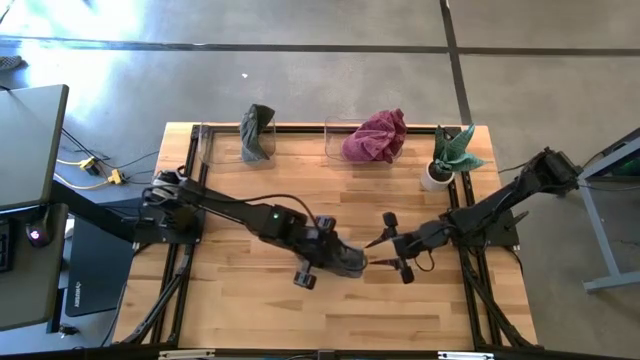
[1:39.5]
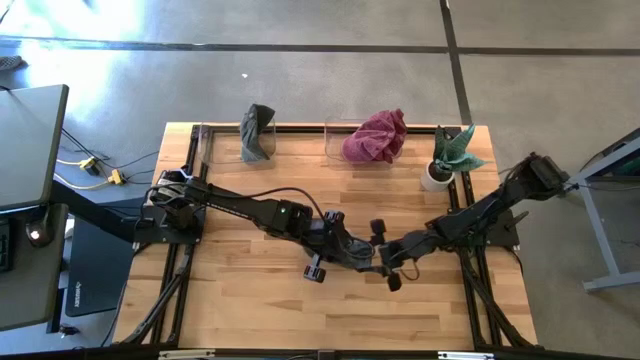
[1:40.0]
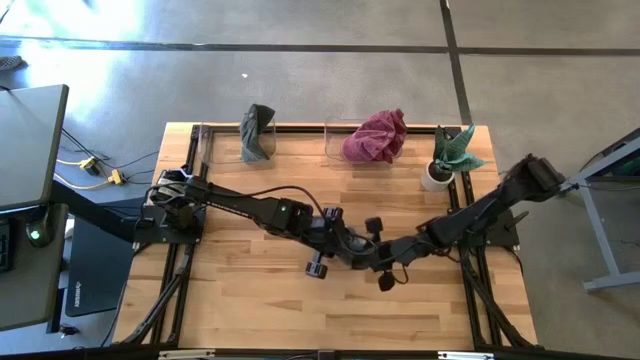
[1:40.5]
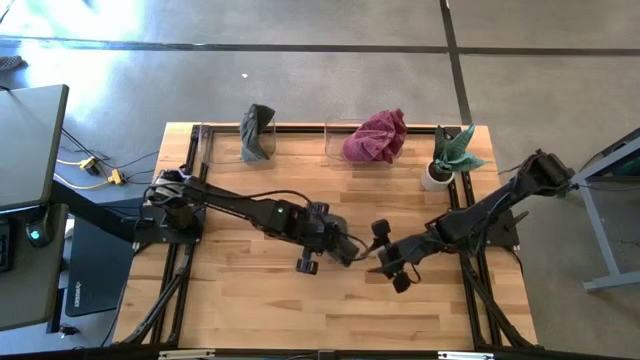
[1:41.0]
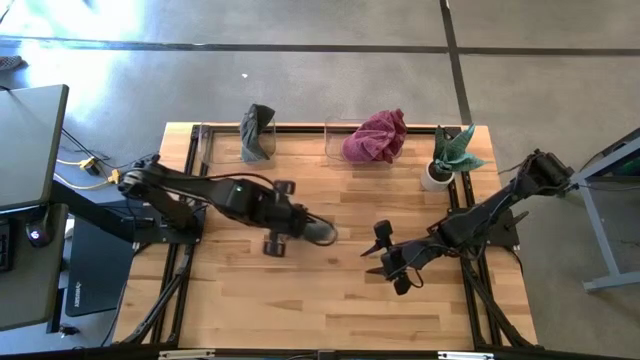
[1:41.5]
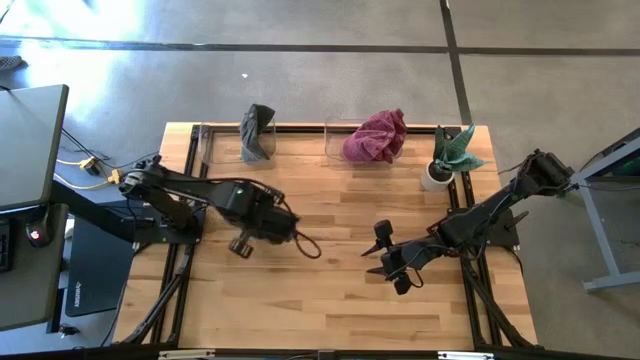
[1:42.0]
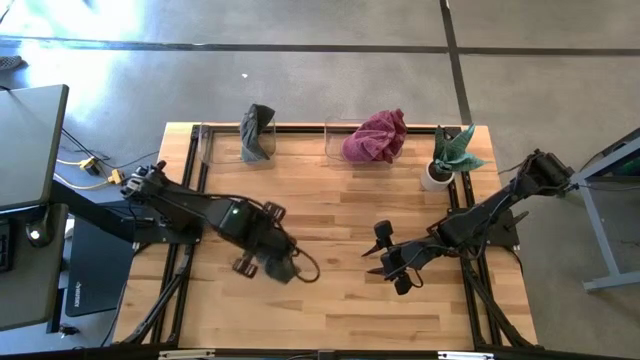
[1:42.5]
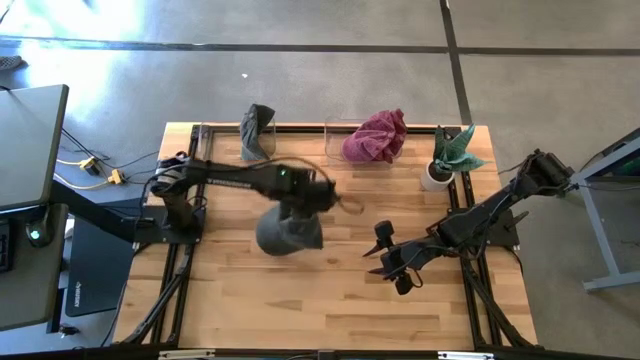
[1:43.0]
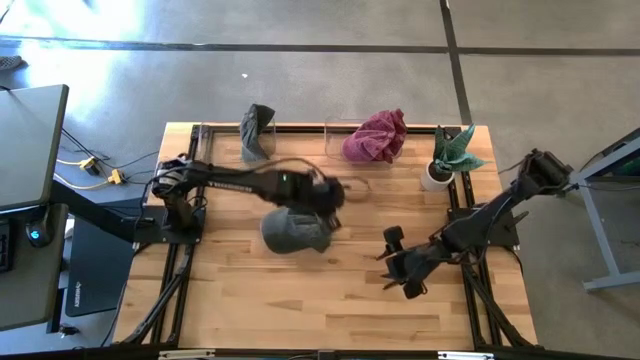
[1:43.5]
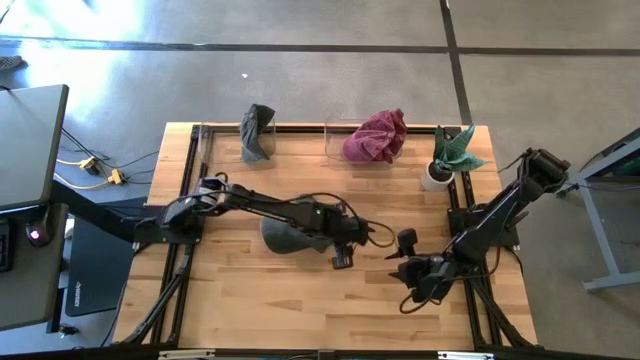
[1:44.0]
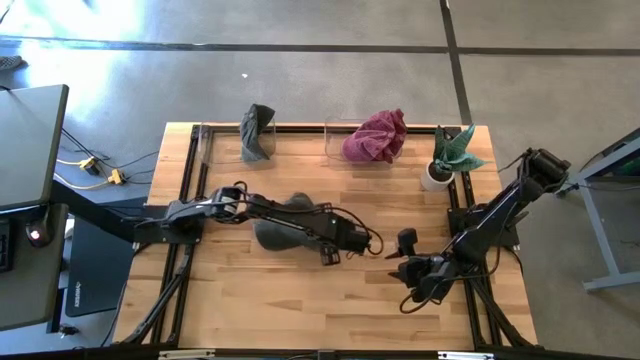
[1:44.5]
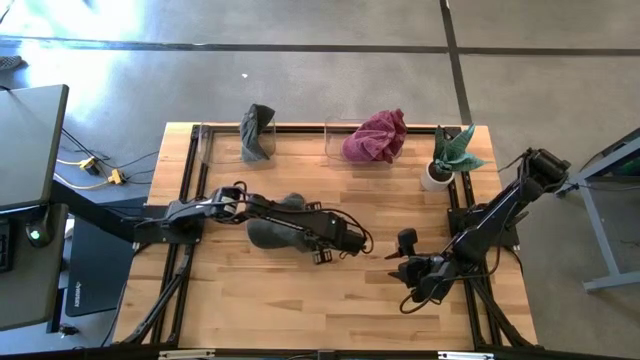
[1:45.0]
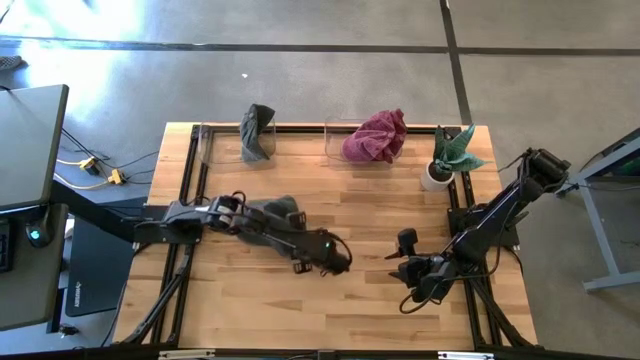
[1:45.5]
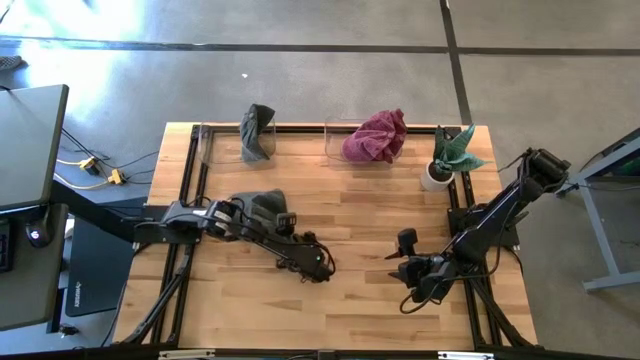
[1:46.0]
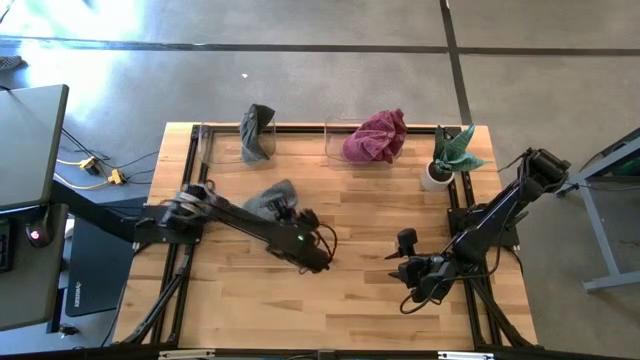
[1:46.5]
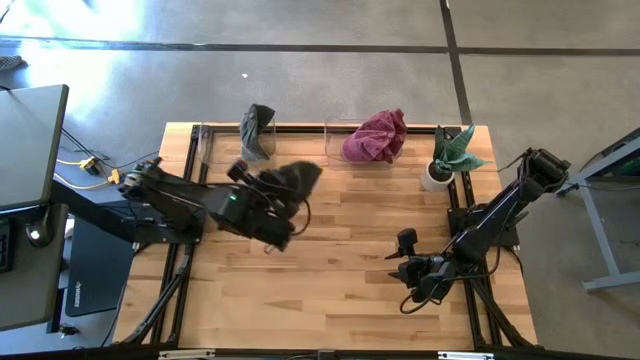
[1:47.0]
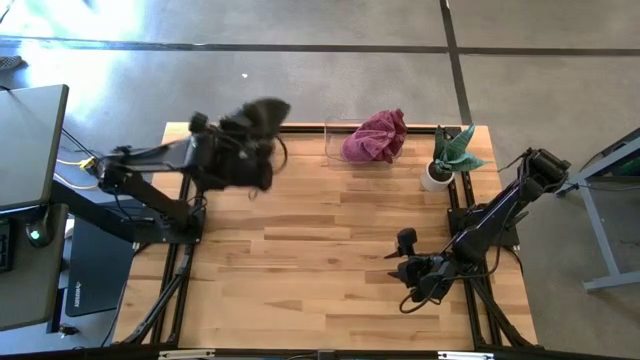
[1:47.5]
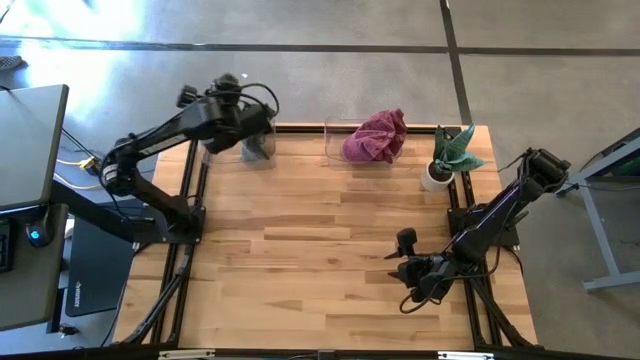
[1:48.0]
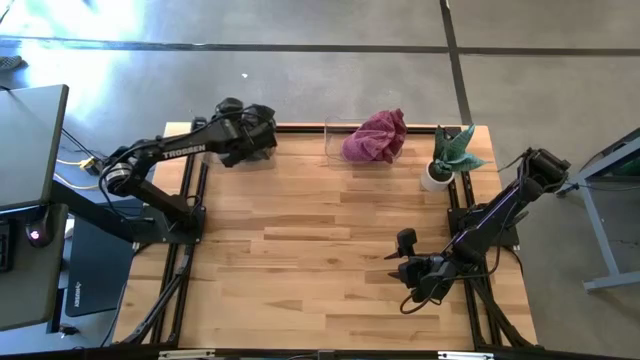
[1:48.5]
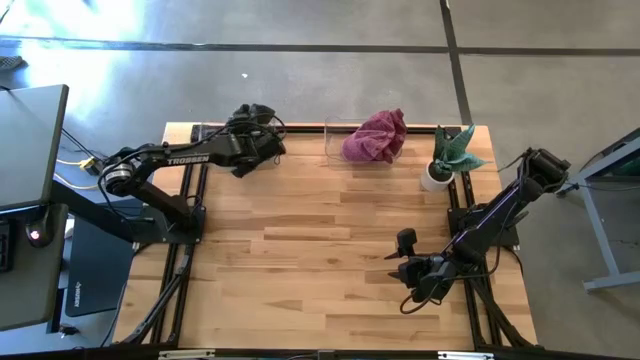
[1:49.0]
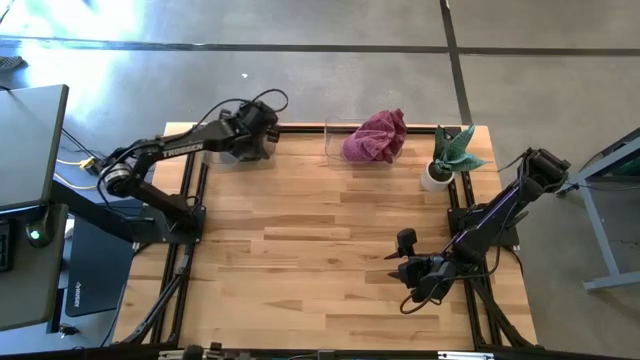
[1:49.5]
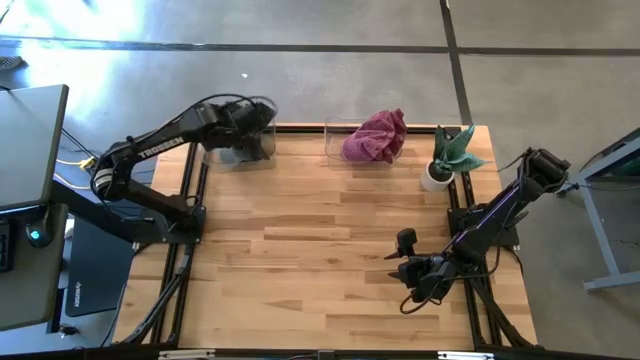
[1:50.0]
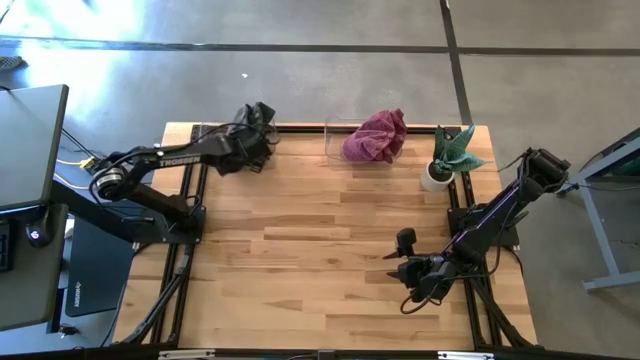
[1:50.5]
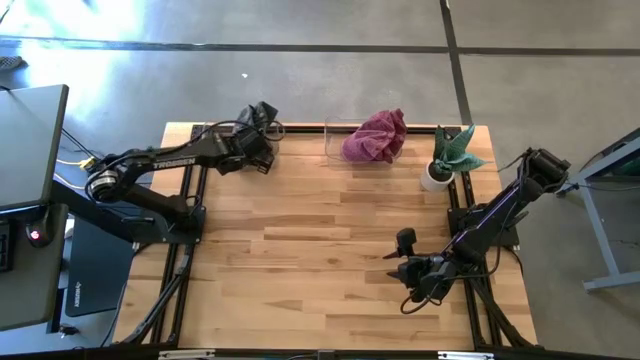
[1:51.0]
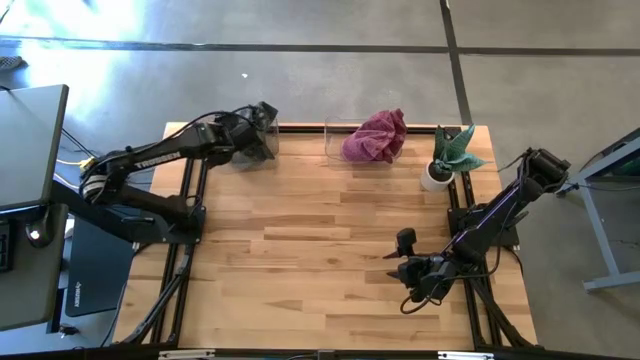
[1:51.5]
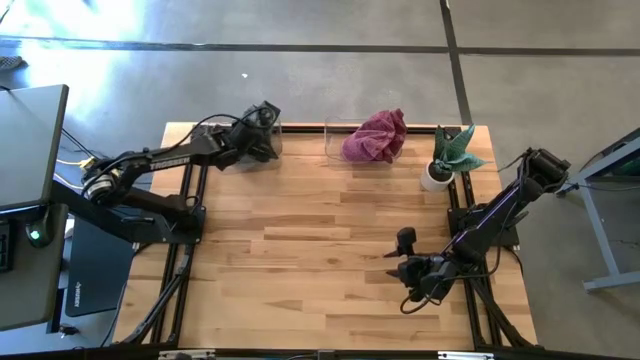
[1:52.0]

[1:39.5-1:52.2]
Task: Pick & Place hat
Put the black cap into the left transparent bin

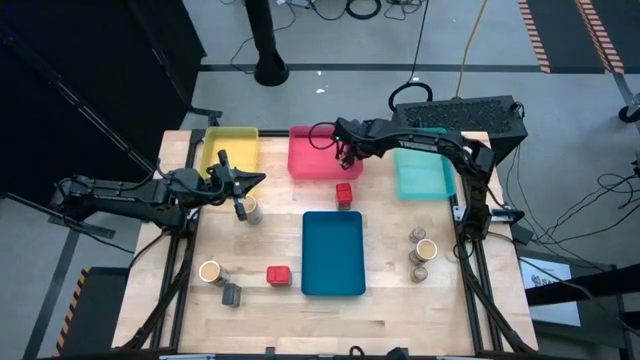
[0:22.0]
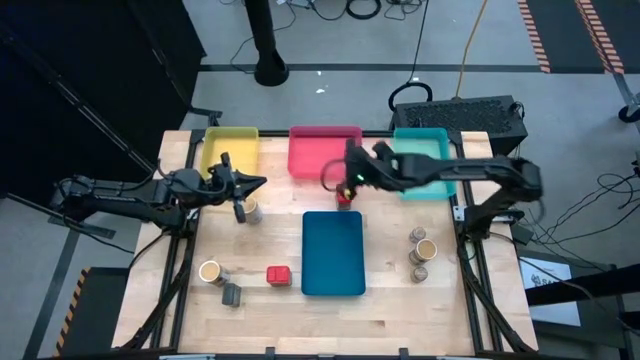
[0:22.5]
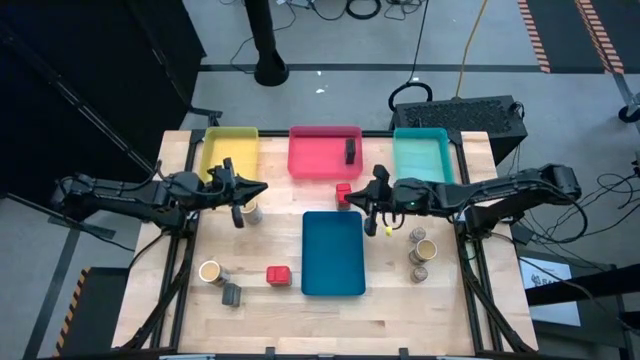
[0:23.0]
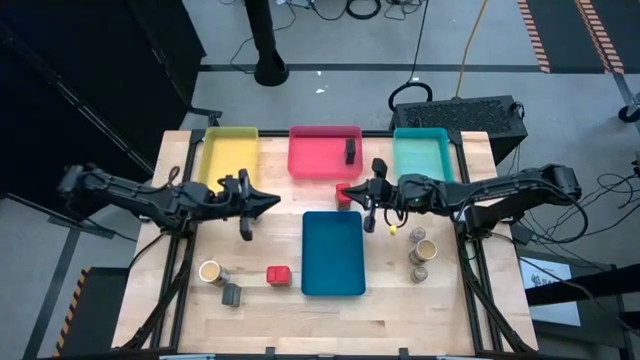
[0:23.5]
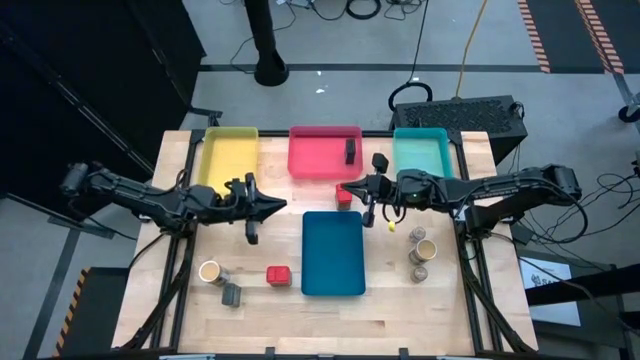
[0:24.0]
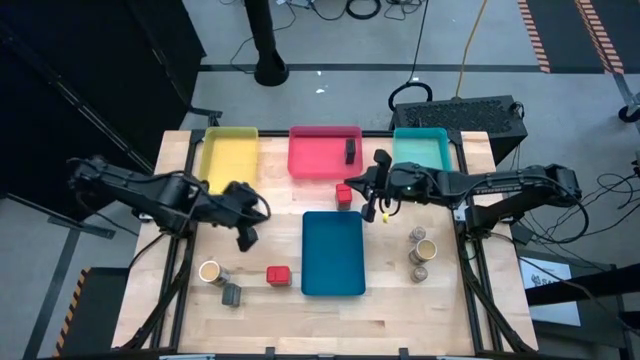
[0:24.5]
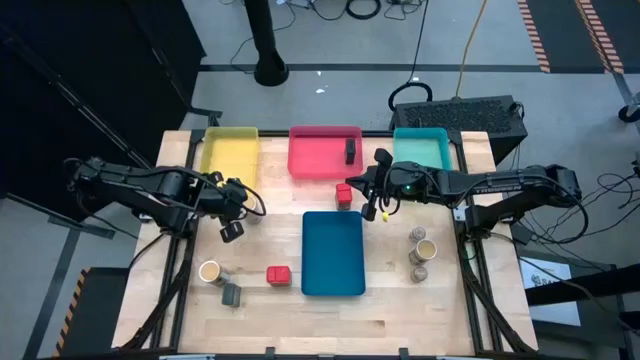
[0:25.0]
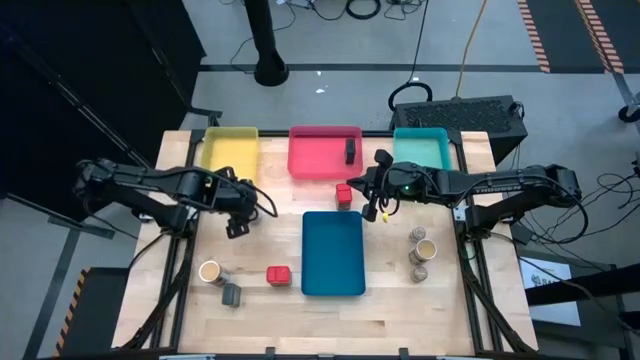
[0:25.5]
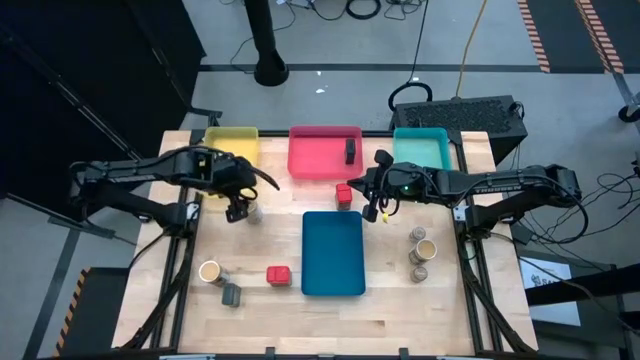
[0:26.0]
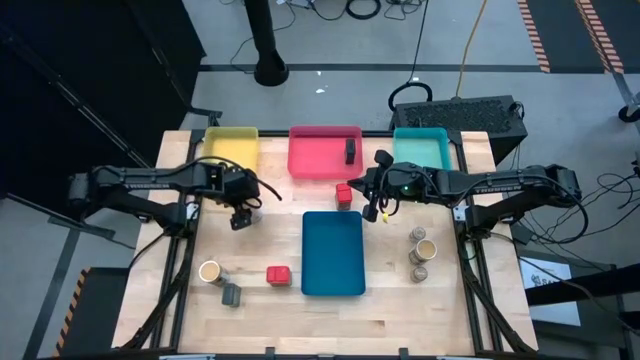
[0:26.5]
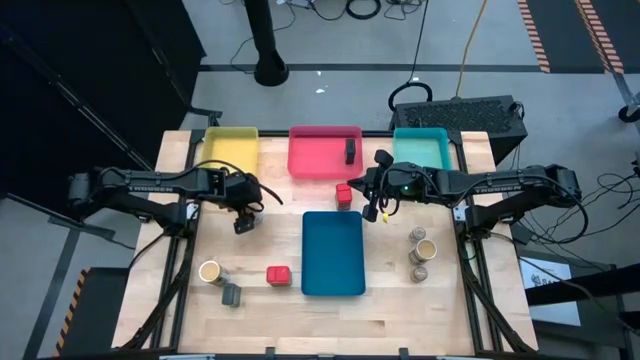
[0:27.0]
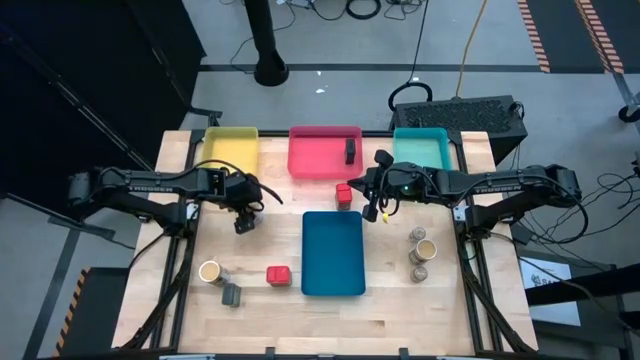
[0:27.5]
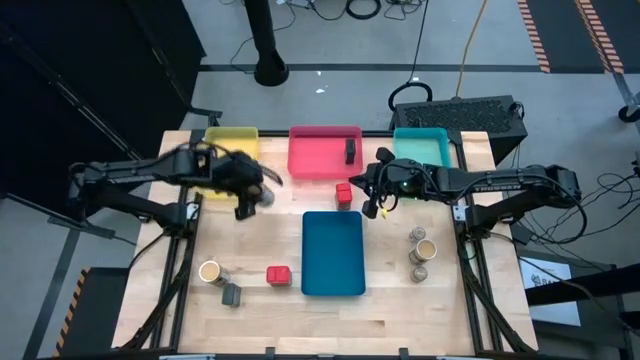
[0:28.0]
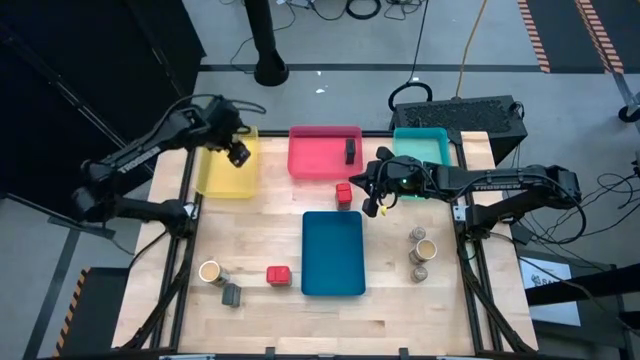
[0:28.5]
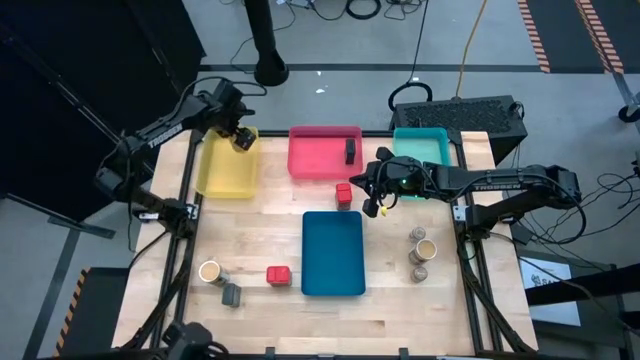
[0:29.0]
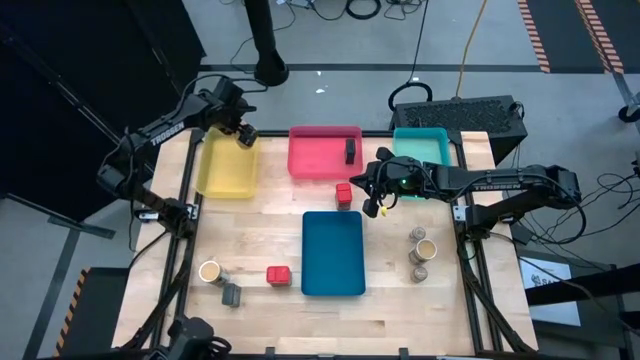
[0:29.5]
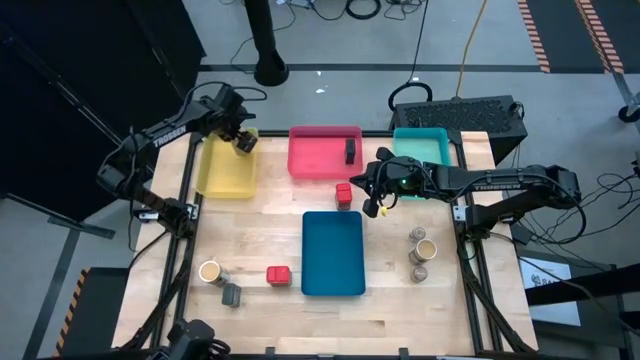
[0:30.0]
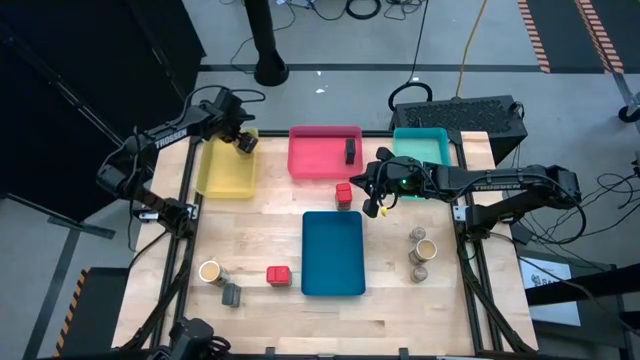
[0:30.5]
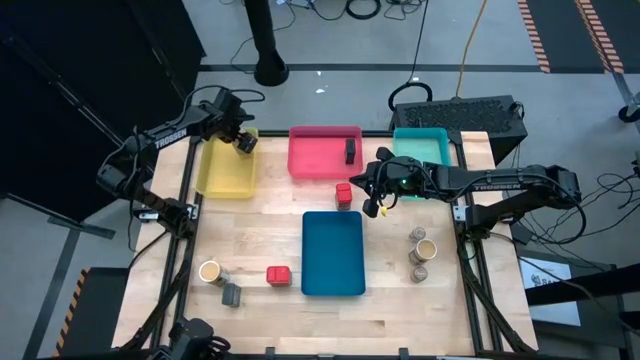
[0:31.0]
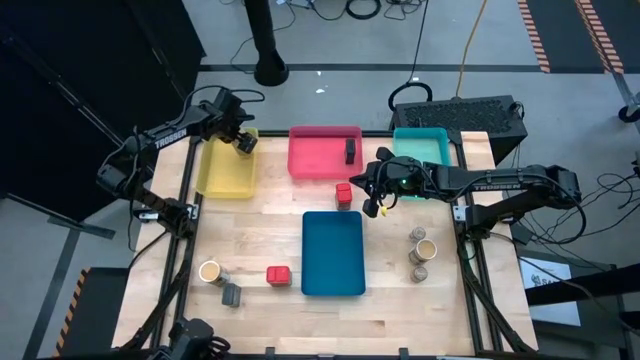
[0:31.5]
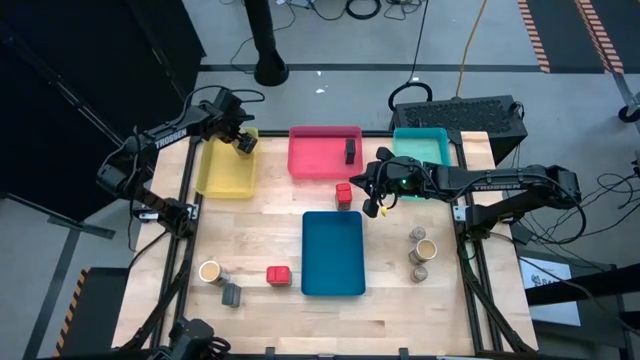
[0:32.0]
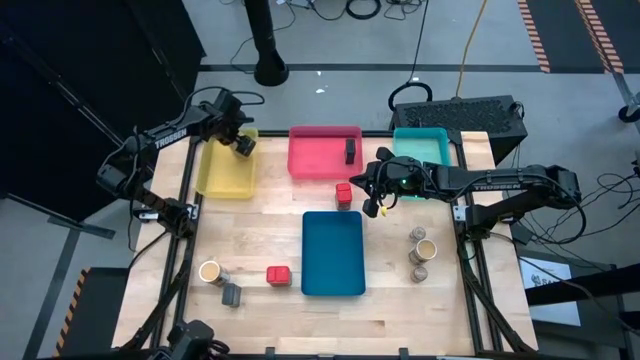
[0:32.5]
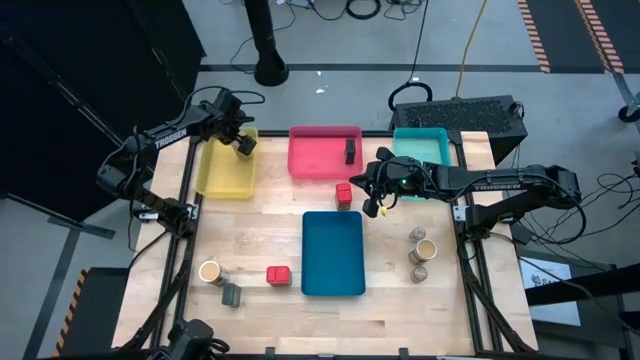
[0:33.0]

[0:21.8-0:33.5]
Task: Sort spices by type
Put the top gold seasoning bottle into the yellow bin
